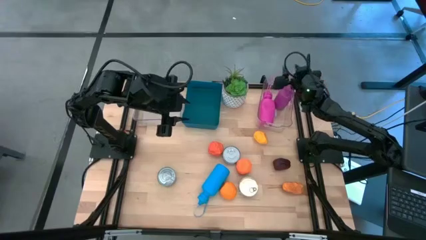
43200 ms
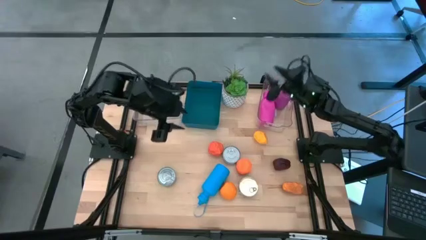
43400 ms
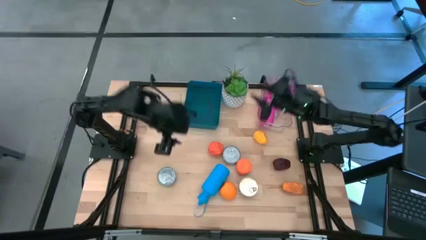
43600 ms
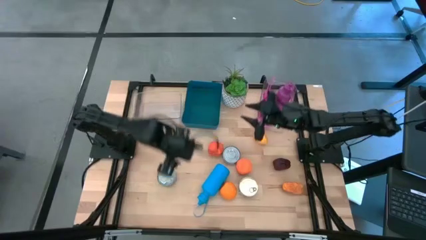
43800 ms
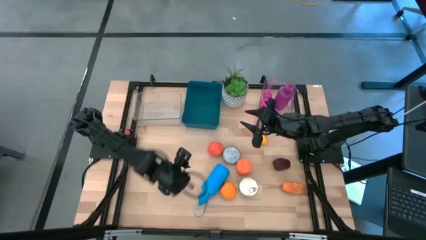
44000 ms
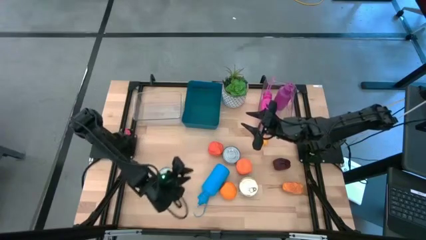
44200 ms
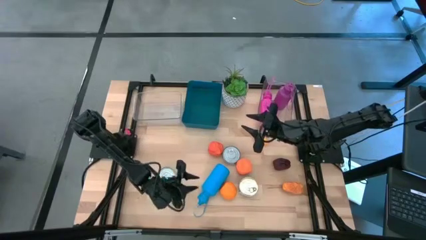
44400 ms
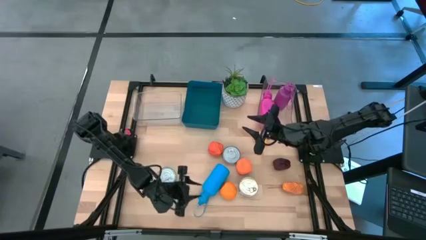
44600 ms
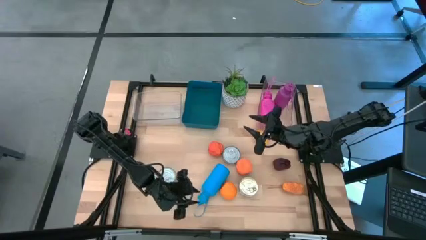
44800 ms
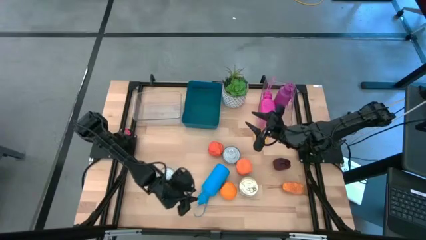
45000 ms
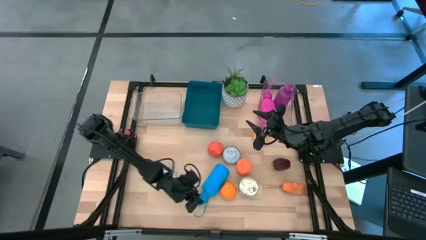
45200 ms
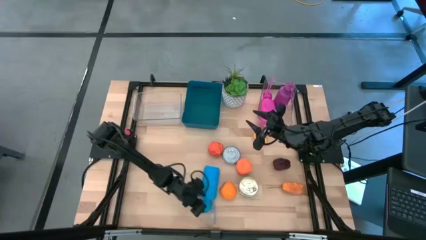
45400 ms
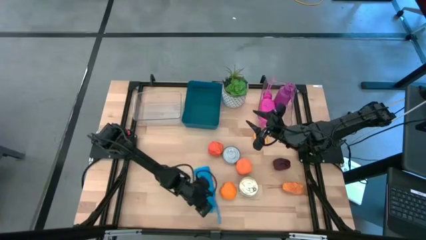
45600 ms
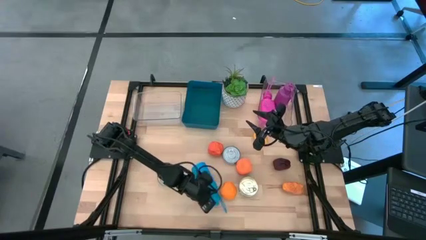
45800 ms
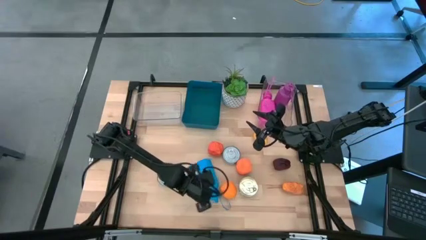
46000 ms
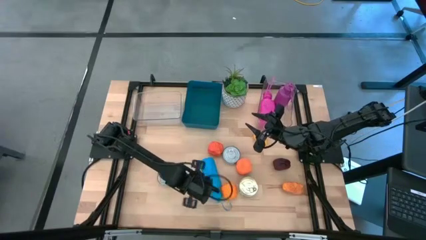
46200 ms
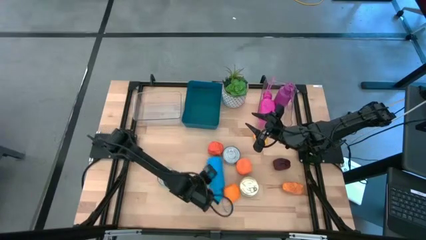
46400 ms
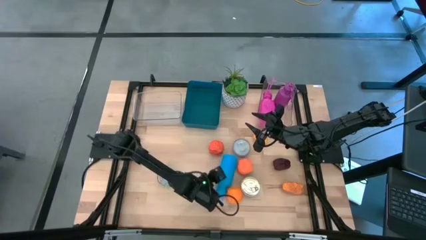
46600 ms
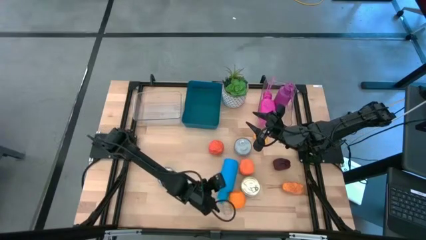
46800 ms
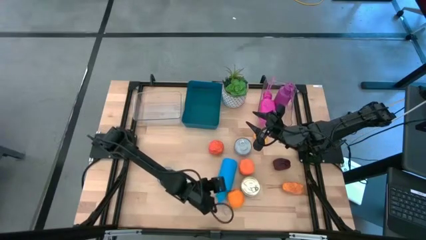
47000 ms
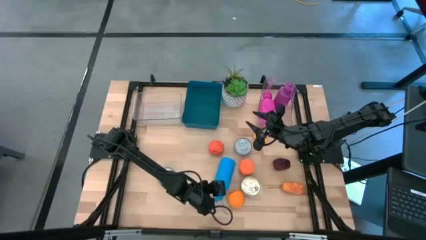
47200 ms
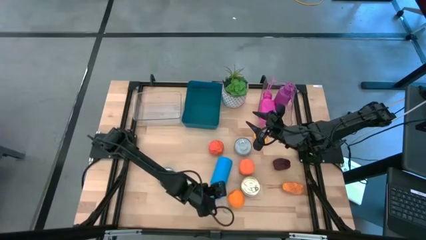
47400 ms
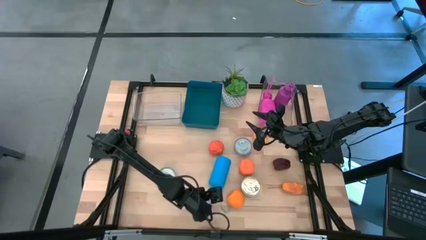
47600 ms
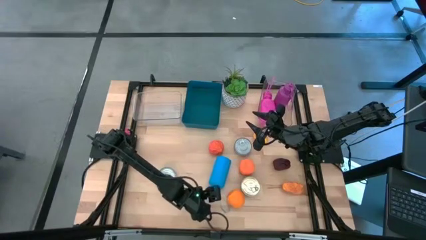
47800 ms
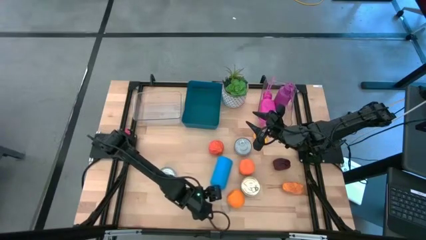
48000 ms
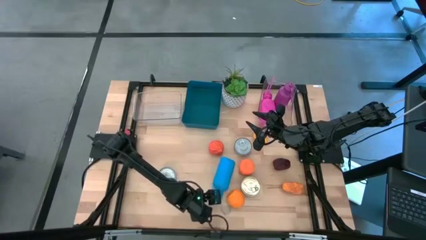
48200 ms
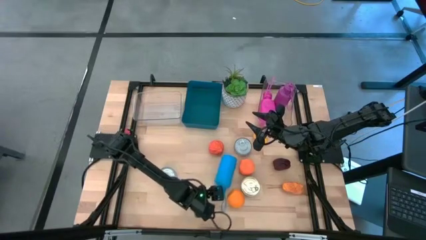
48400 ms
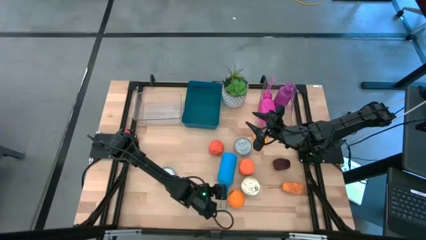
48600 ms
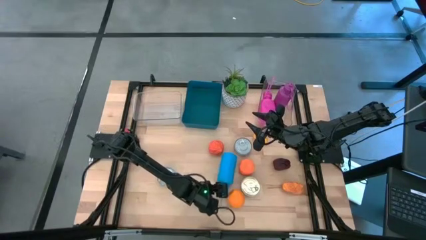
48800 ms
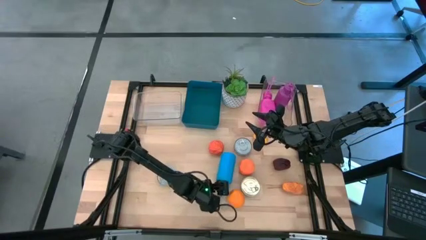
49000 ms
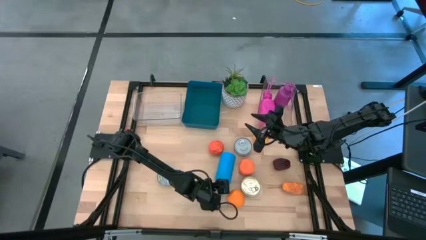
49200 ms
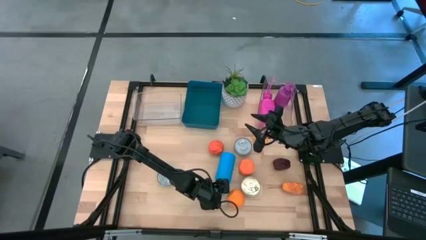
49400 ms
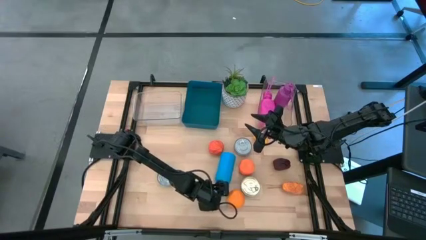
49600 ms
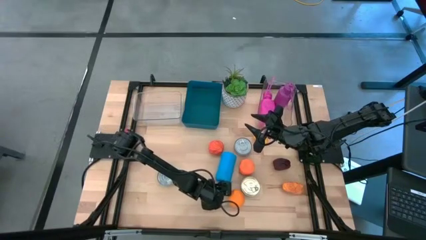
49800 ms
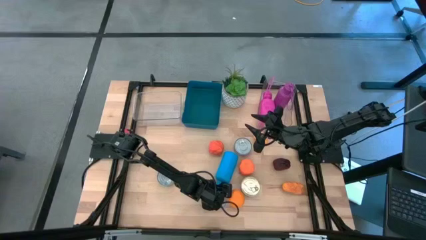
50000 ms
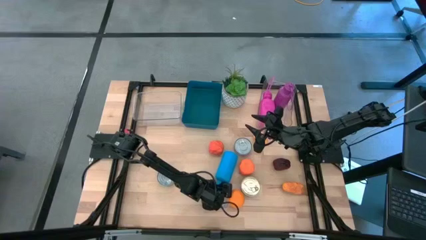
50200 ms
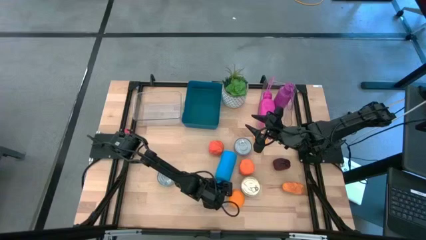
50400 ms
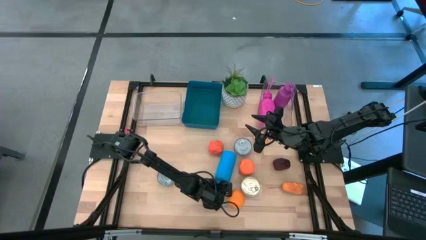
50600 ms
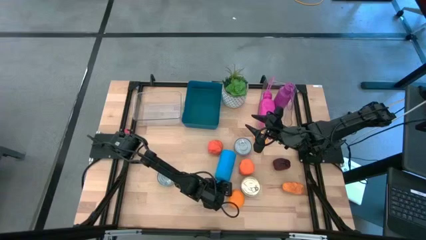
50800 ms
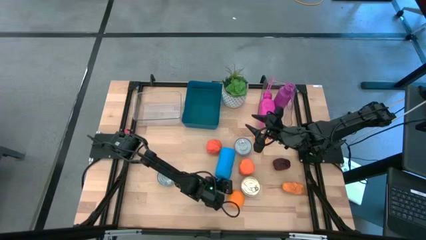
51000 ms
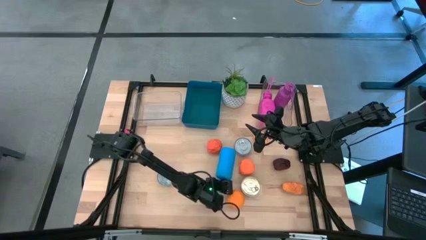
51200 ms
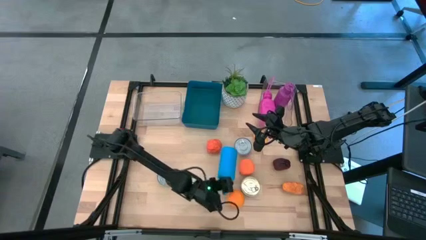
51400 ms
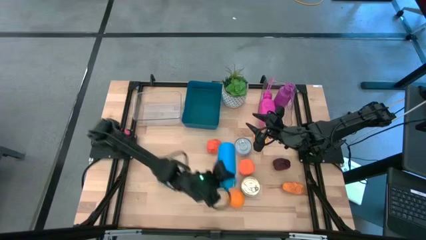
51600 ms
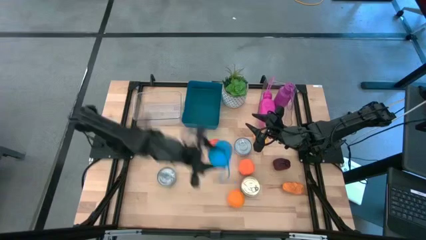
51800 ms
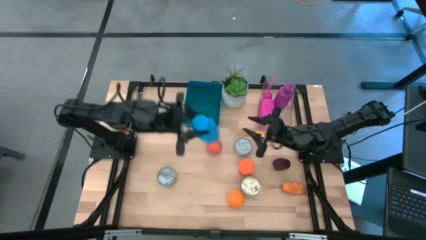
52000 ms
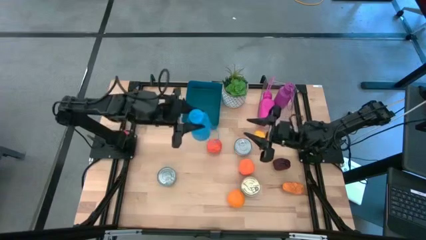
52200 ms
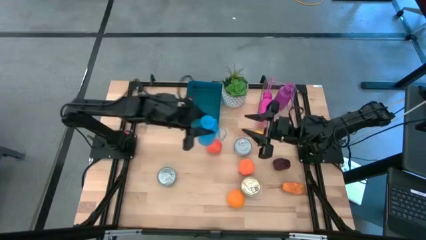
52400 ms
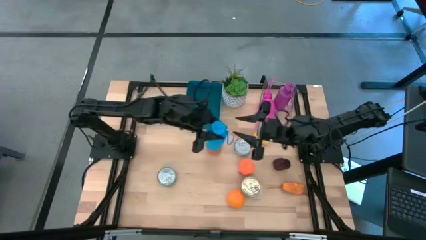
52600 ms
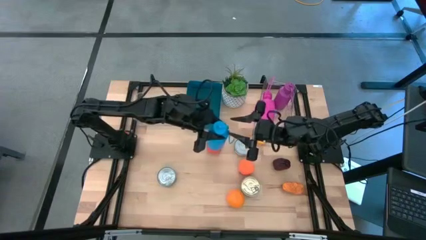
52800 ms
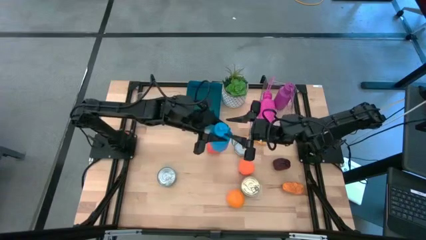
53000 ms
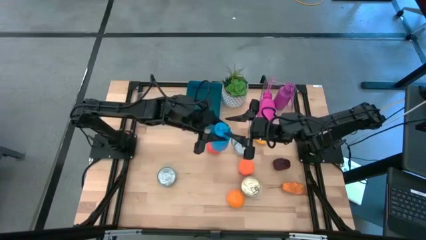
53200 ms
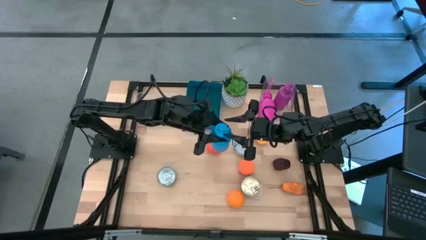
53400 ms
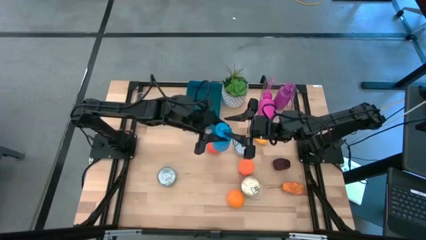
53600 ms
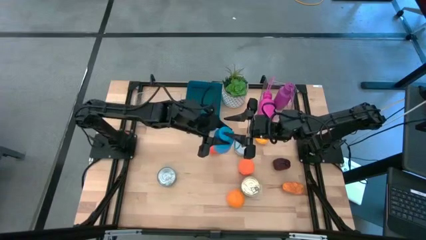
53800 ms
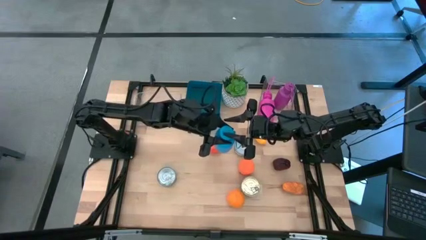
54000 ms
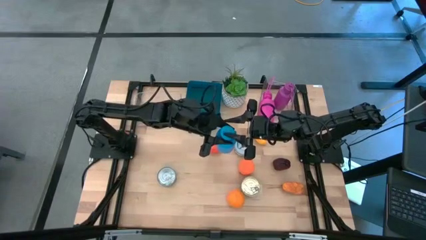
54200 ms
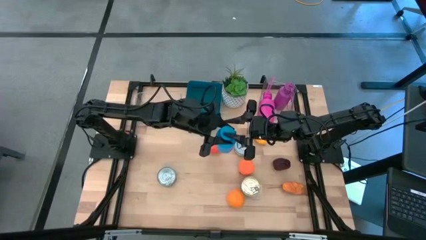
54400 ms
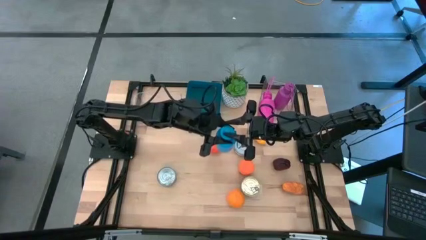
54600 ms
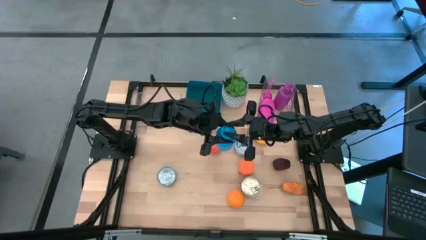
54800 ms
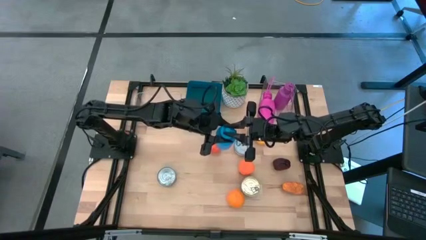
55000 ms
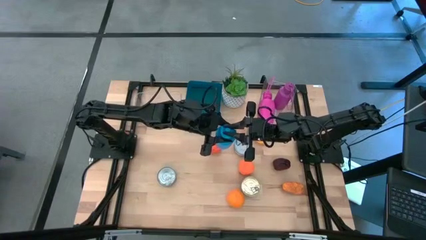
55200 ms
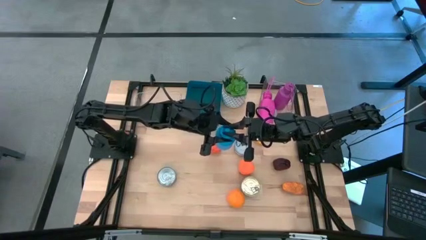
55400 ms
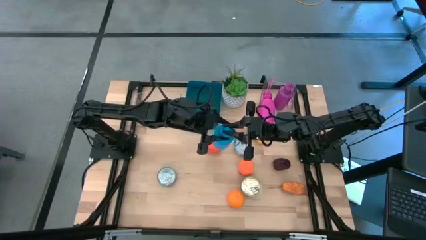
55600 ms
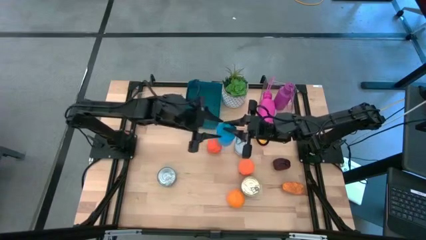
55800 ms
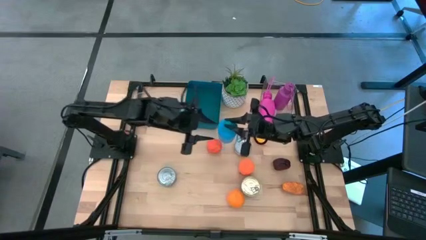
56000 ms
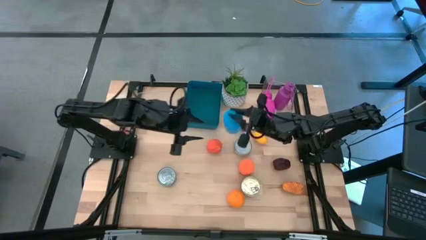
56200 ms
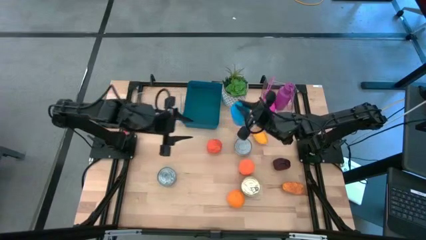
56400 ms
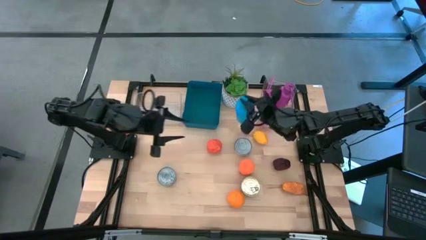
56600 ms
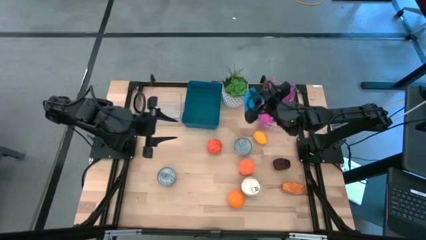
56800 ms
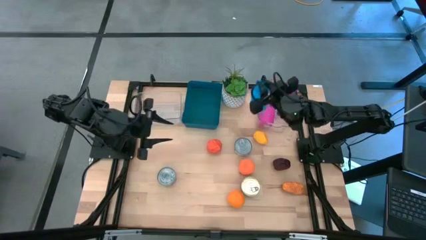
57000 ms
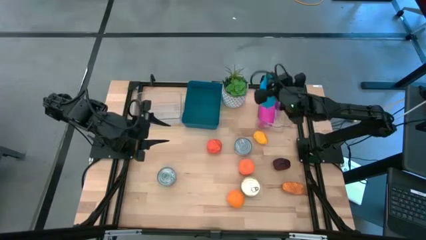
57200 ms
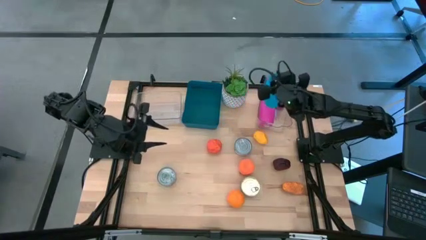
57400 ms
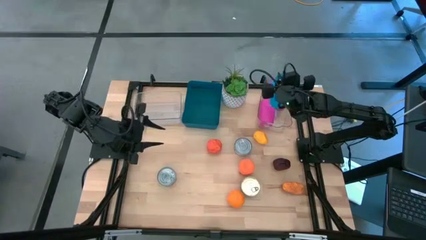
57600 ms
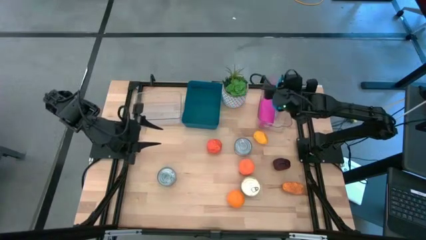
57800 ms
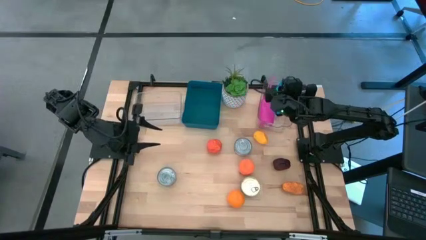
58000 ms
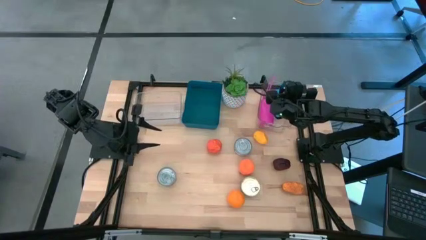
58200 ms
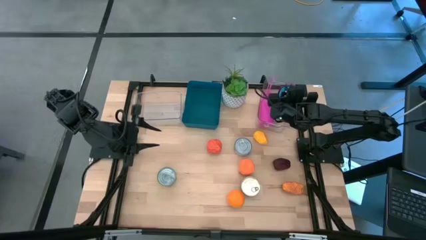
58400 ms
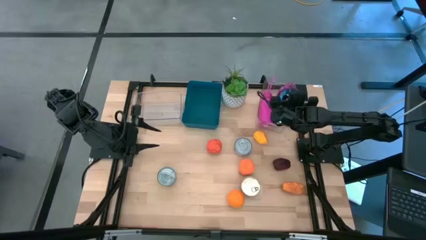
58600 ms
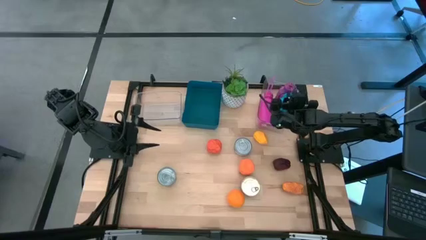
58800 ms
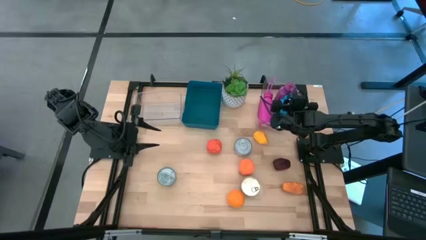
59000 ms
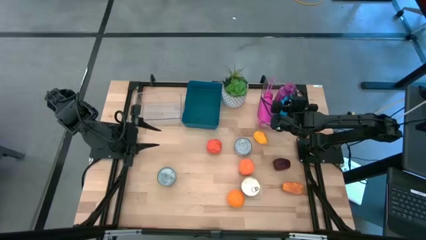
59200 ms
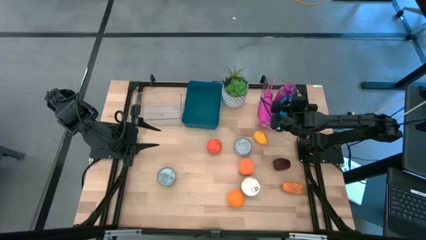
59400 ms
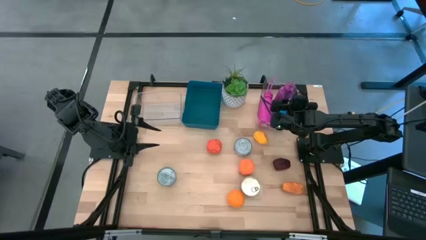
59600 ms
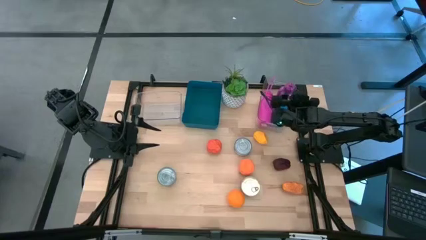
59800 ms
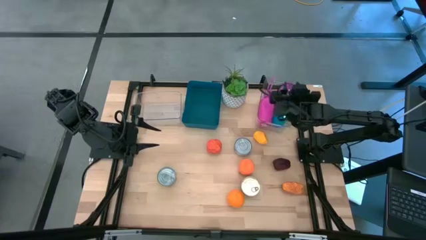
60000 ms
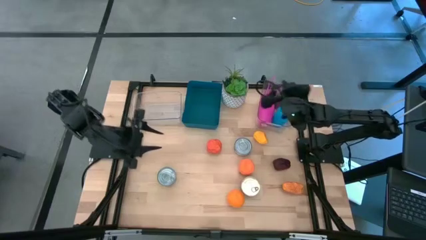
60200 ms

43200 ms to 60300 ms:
Task: Pick & Place Food Item
Put the blue water bottle into the right transparent bin

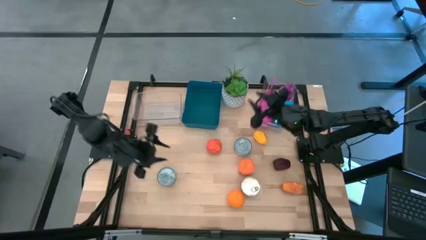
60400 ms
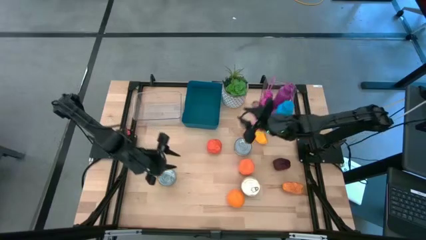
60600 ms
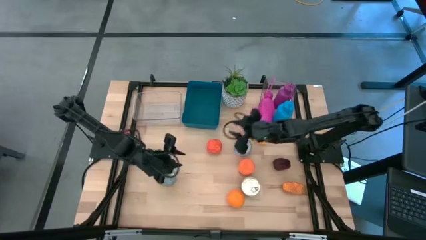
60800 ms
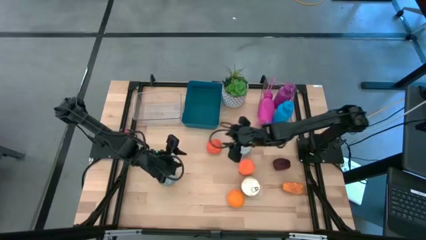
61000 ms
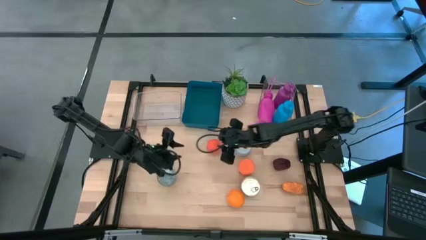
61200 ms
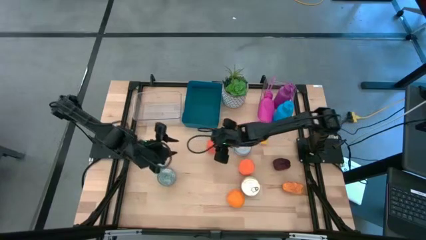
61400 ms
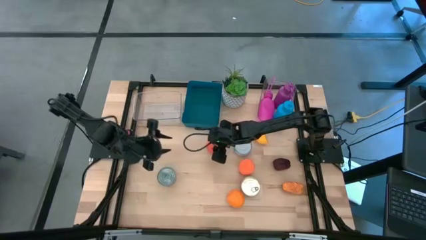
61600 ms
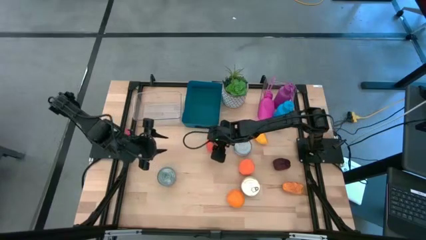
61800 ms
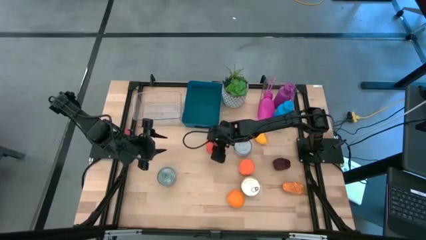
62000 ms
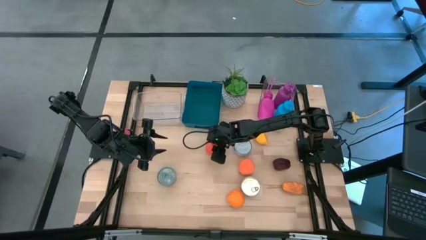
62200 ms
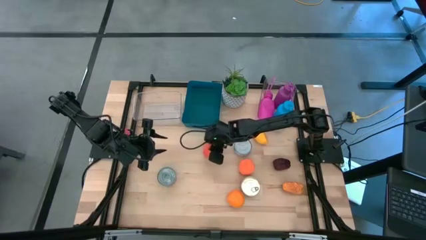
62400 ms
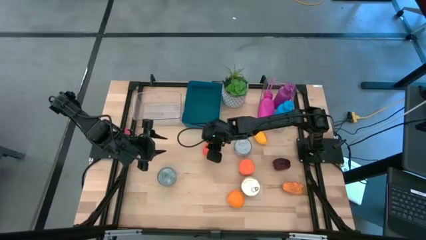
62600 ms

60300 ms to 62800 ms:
Put the top orange into the blue bin
